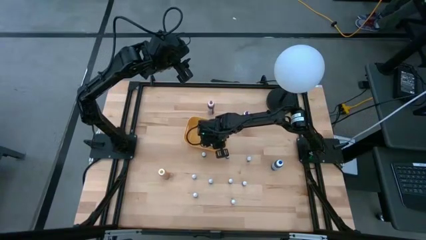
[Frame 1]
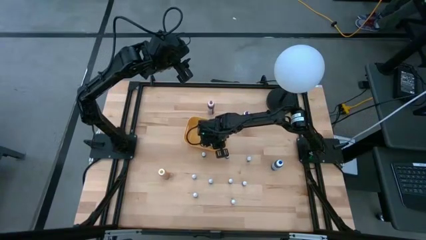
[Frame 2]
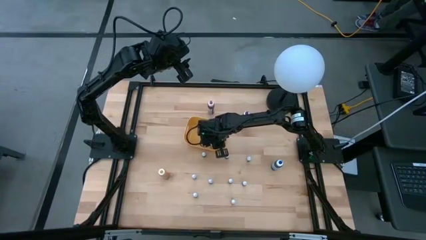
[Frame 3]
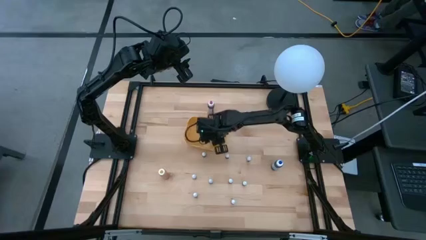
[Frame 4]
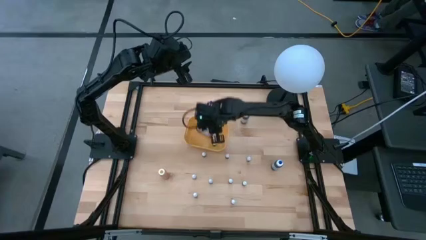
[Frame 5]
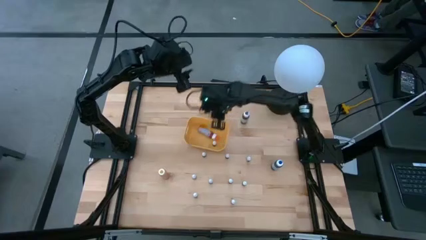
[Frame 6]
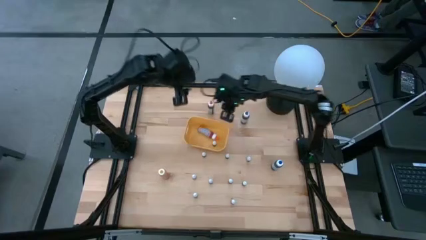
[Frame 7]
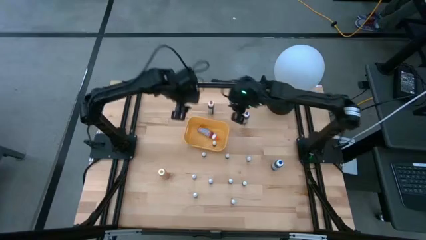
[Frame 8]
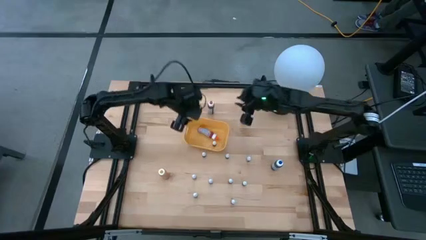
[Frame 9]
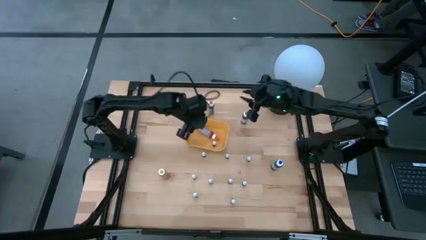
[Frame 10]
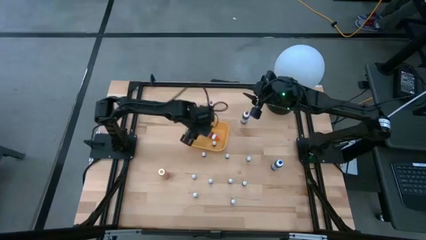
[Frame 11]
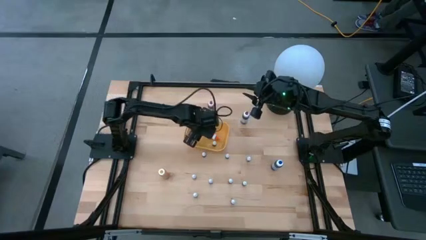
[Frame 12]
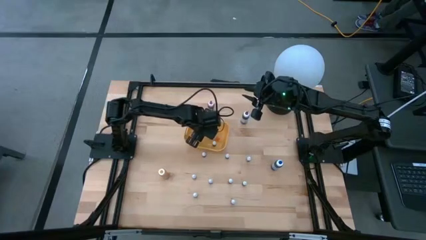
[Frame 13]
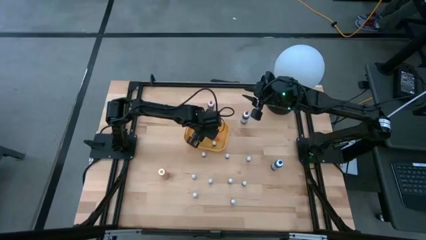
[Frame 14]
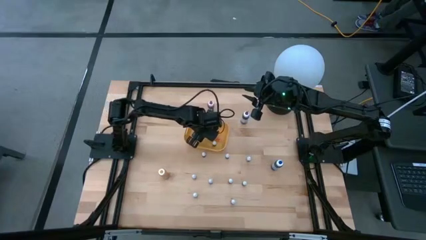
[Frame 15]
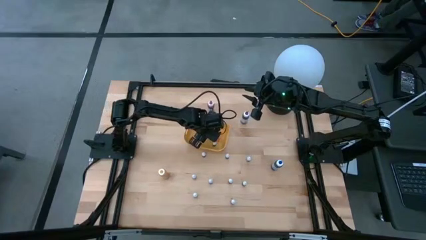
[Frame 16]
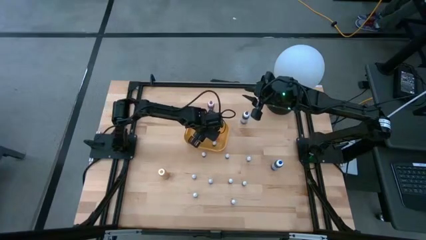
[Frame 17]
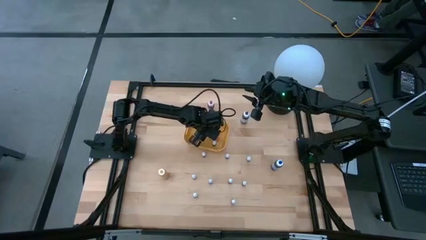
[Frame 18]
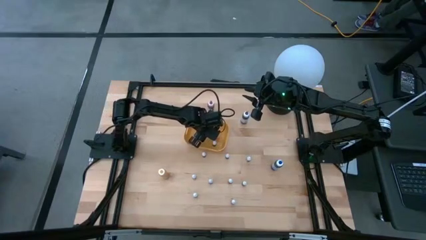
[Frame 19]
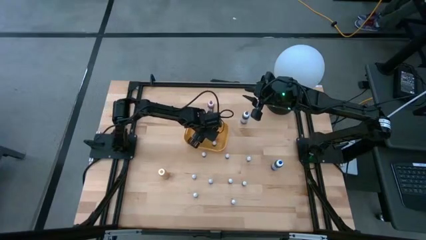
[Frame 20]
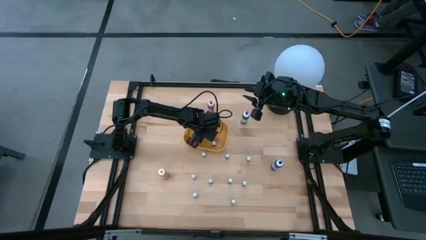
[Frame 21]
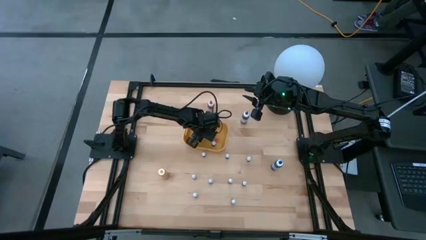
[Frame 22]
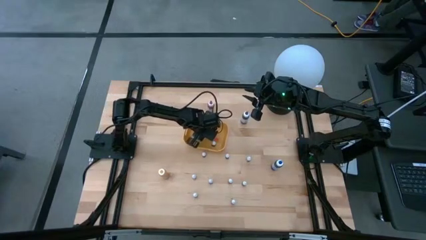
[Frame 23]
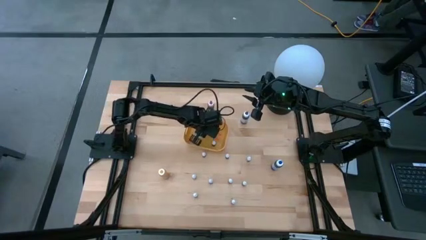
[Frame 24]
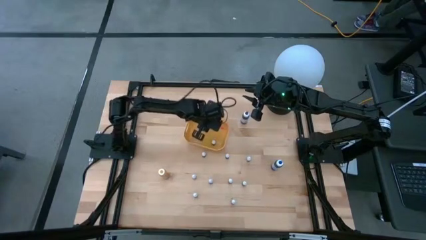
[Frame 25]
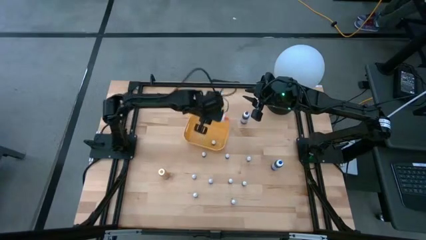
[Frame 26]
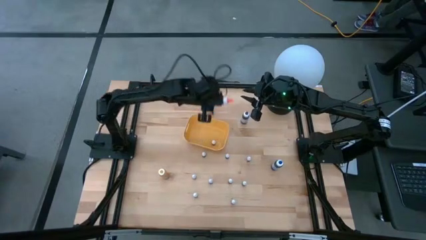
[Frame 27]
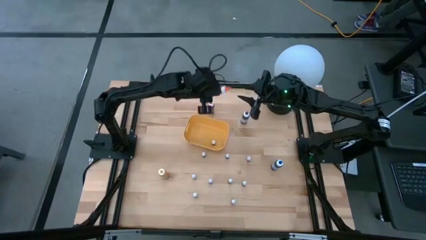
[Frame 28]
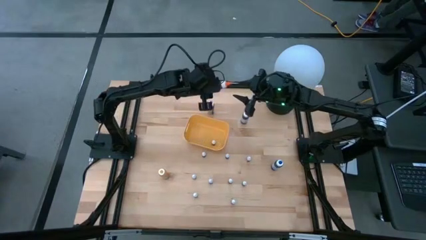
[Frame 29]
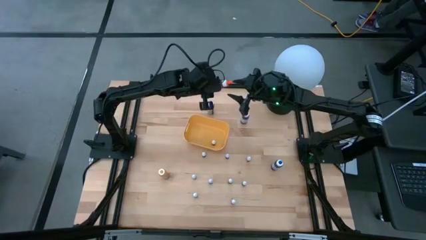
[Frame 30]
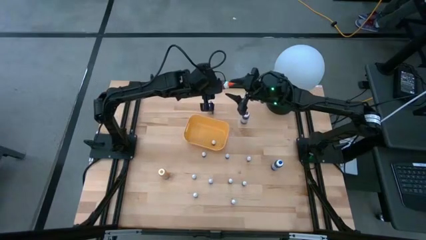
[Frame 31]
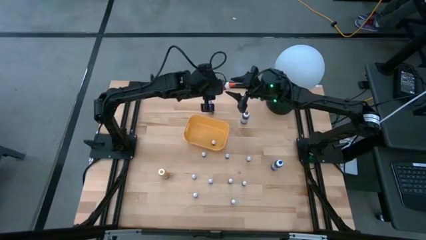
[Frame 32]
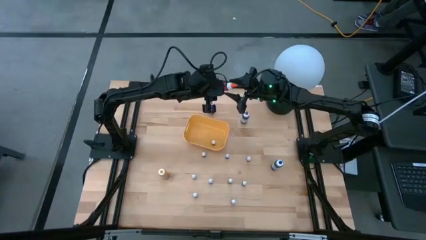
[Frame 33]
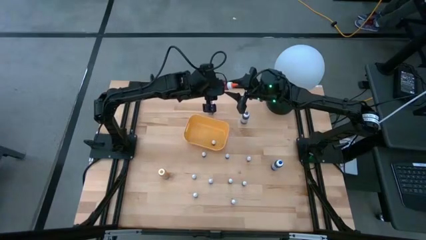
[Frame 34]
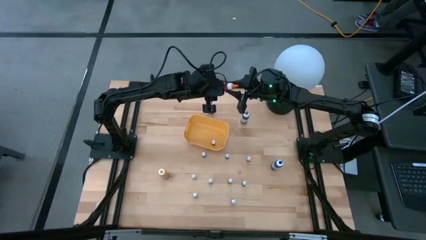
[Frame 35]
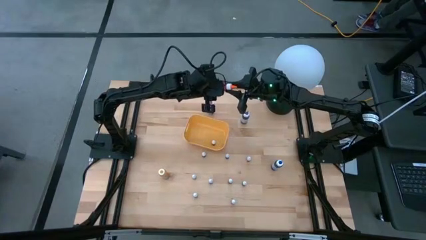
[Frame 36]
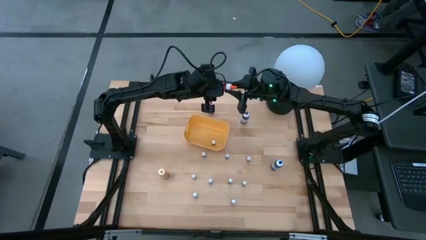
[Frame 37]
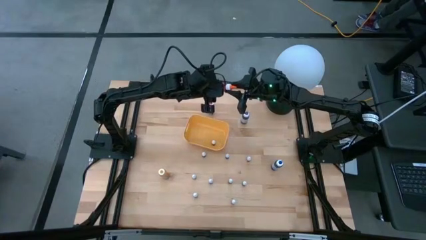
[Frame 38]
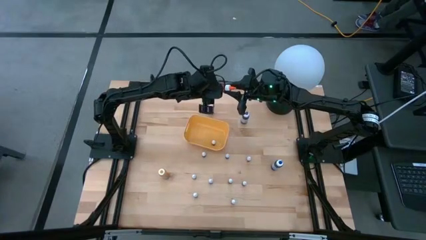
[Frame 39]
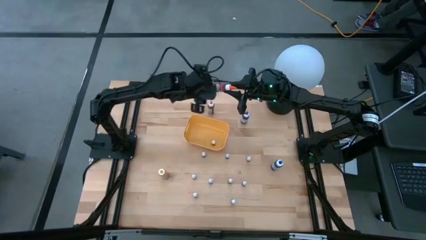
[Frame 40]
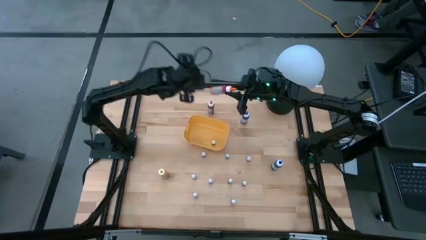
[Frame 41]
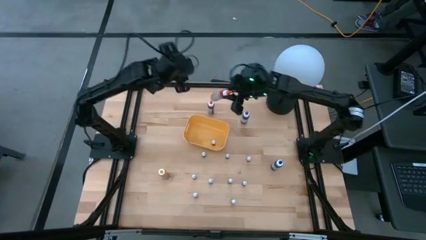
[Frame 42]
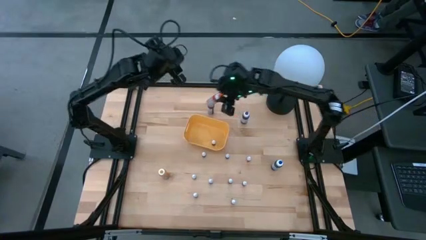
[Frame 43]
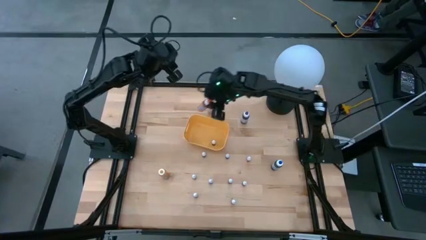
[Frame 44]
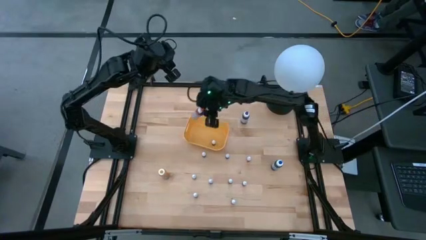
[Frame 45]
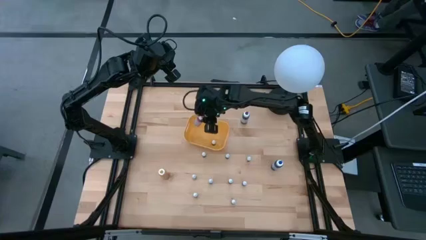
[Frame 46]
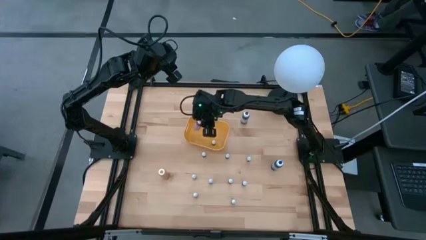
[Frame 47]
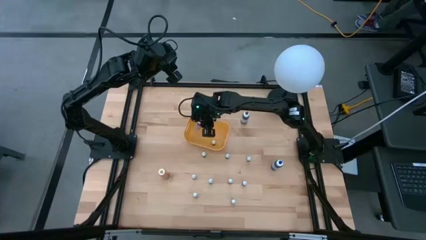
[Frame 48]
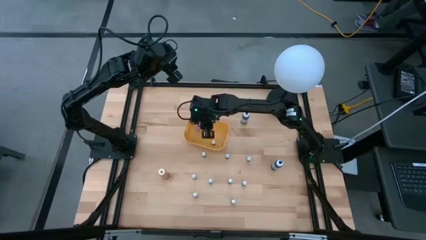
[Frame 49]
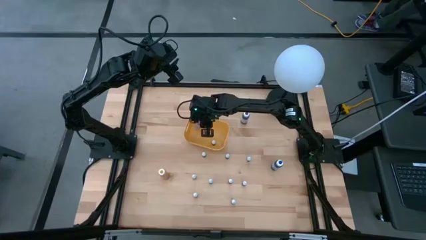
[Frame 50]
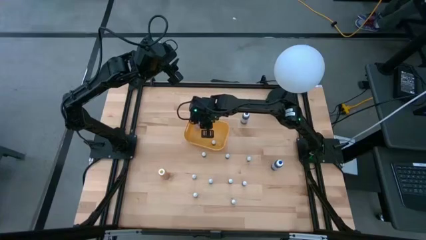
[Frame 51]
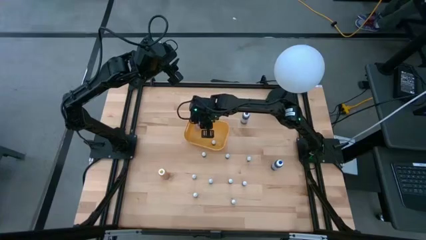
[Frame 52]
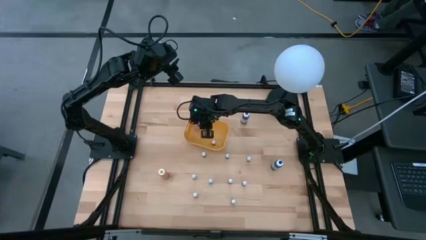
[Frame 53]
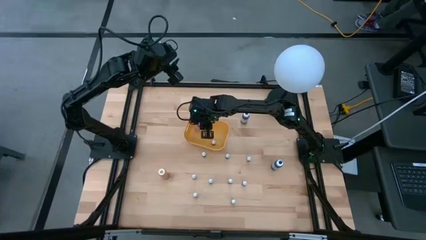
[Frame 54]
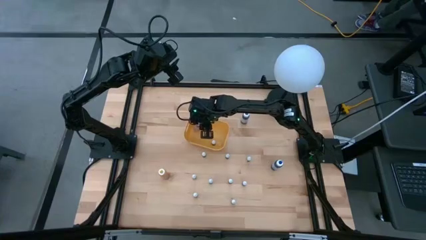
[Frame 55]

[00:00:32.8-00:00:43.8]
Task: Pick & Place food coloring
Adjust the large orange food coloring bottle in the yellow bin

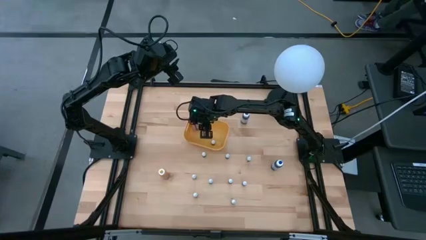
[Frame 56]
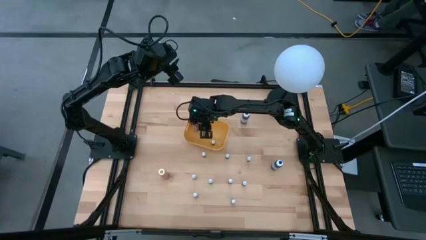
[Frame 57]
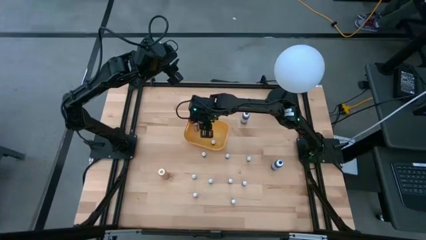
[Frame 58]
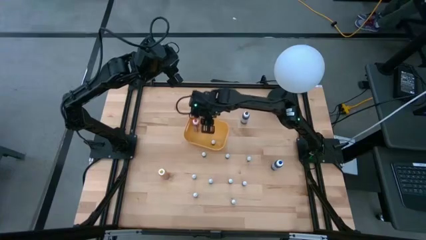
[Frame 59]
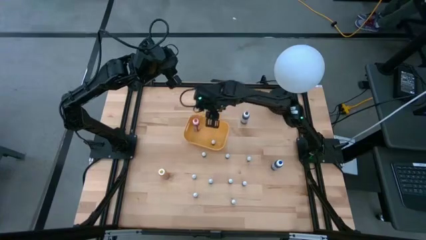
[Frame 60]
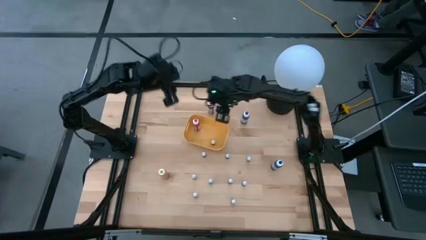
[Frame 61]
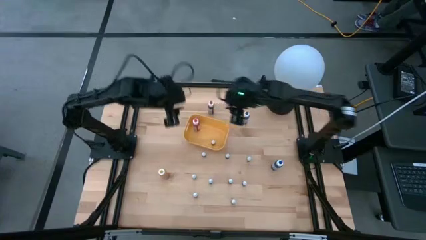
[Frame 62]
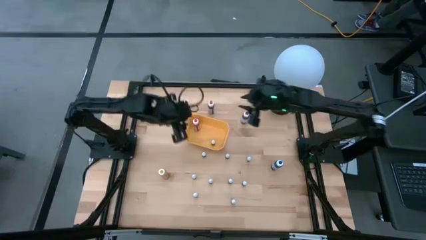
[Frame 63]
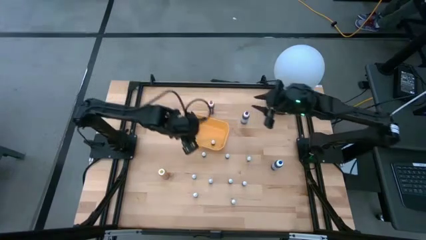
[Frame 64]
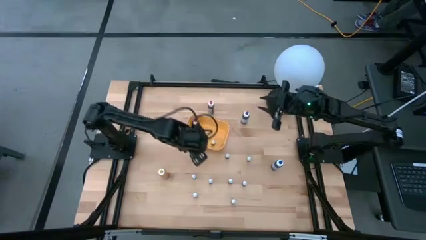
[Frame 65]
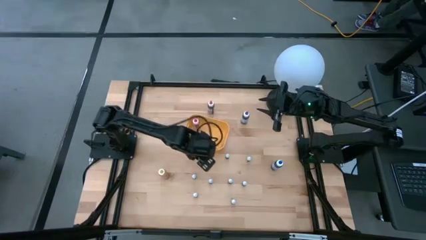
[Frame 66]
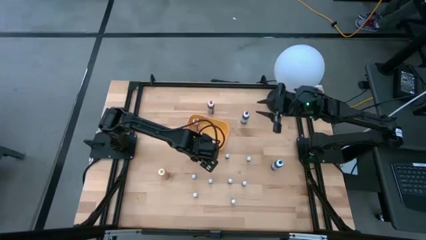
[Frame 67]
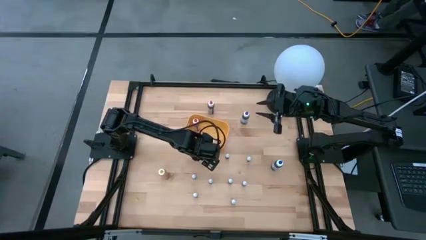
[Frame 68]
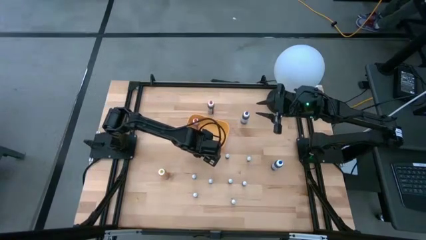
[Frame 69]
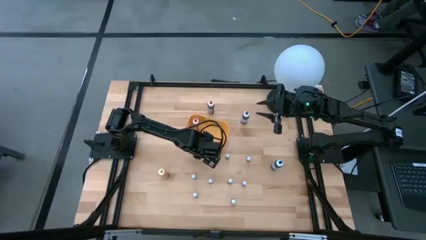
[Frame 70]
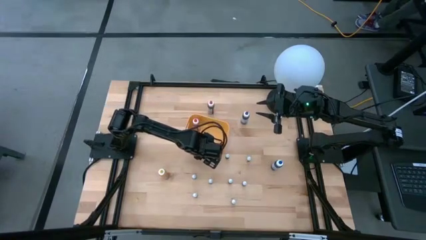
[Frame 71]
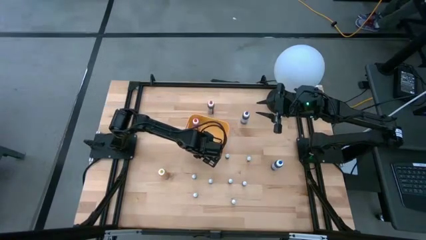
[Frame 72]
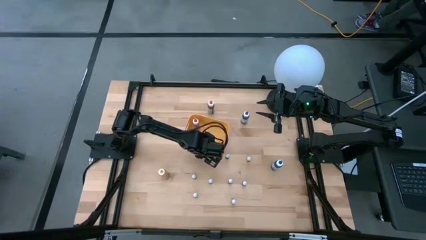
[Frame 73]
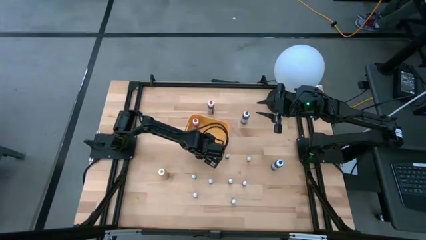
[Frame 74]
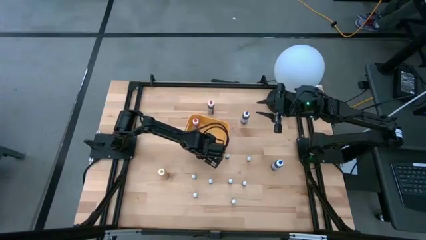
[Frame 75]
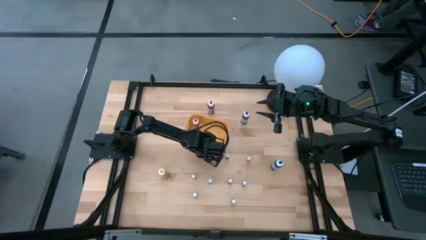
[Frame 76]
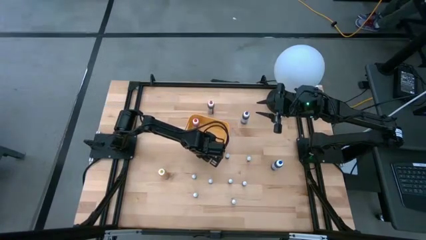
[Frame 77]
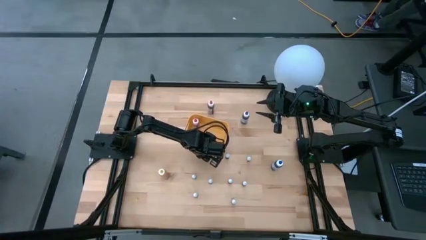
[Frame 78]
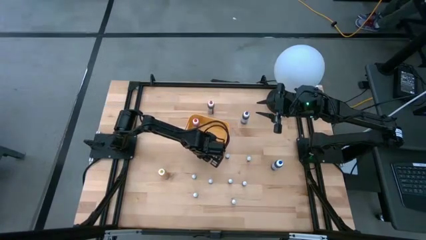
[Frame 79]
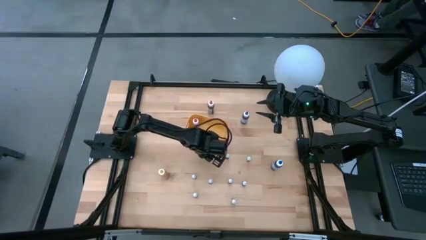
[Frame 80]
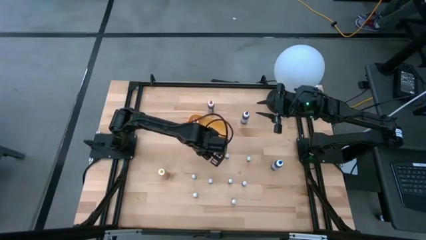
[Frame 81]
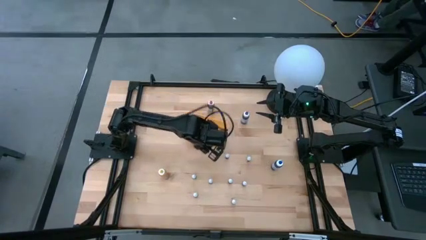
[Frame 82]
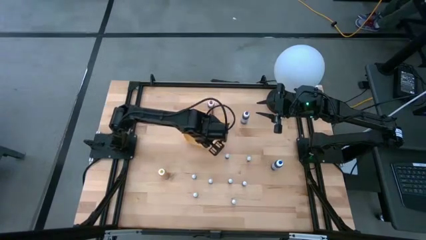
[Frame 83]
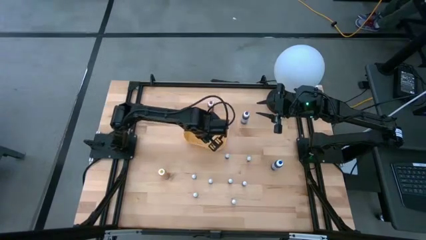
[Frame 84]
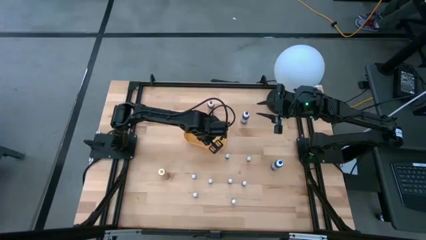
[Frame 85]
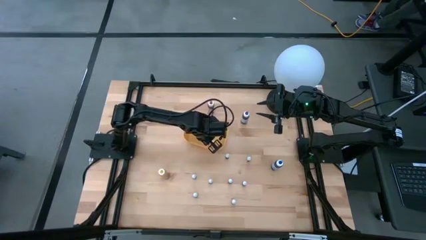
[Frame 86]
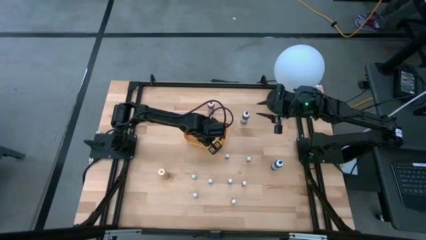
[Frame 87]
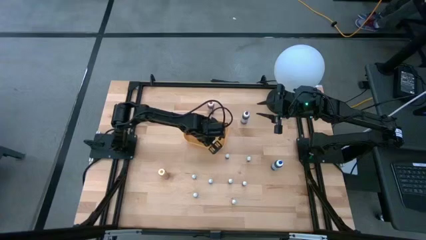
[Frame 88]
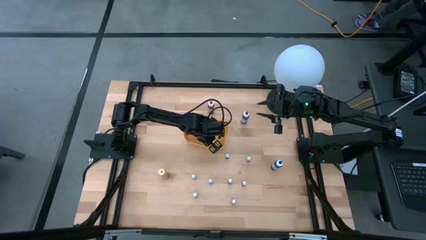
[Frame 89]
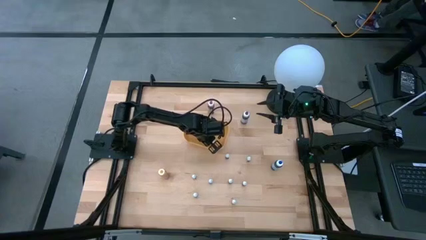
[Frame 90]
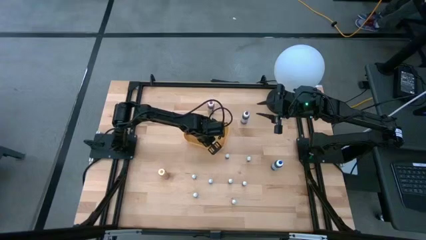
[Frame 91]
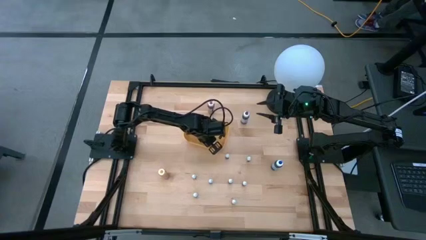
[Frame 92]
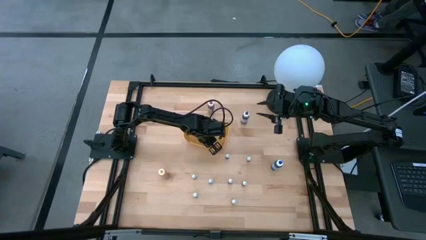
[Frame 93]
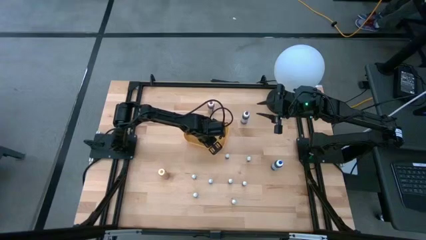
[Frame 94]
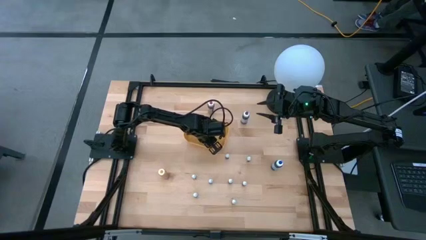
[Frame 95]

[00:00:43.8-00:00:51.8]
Put the small brown food coloring bottle into the yellow bin
